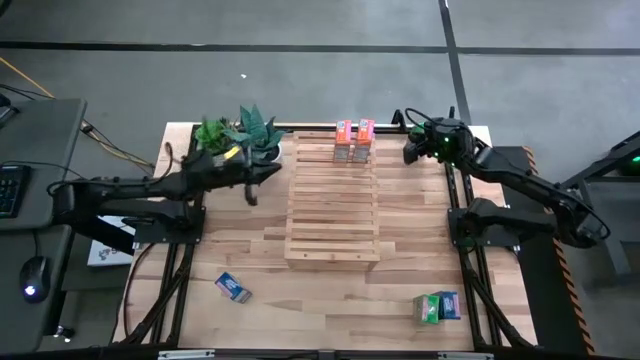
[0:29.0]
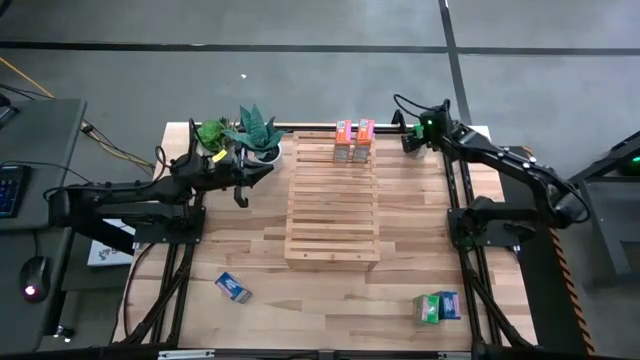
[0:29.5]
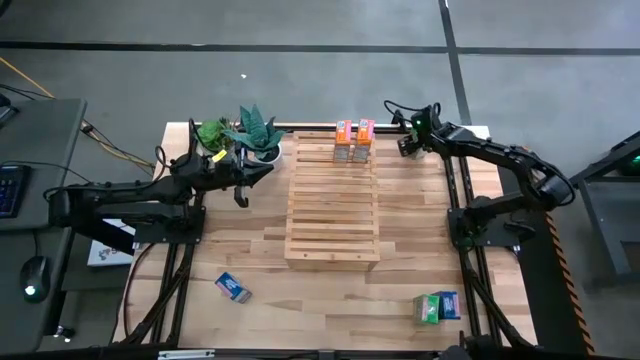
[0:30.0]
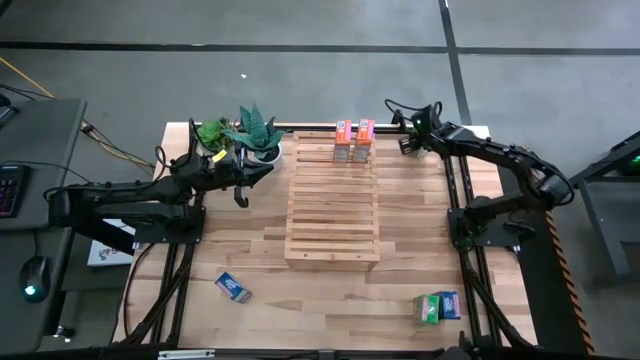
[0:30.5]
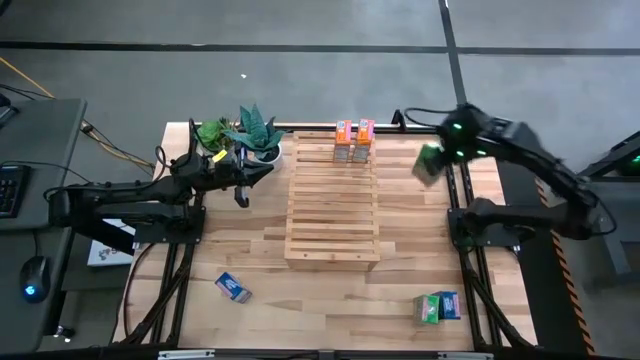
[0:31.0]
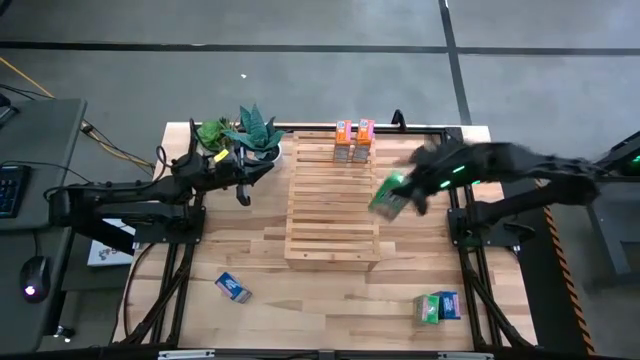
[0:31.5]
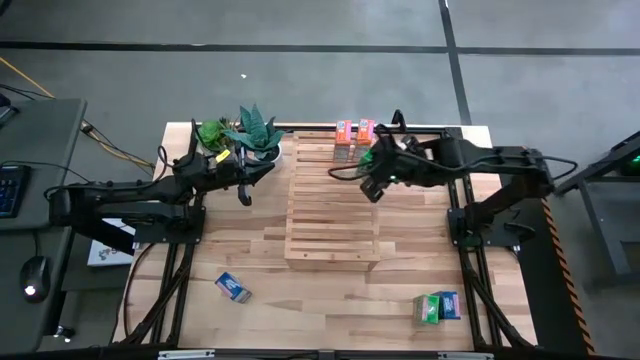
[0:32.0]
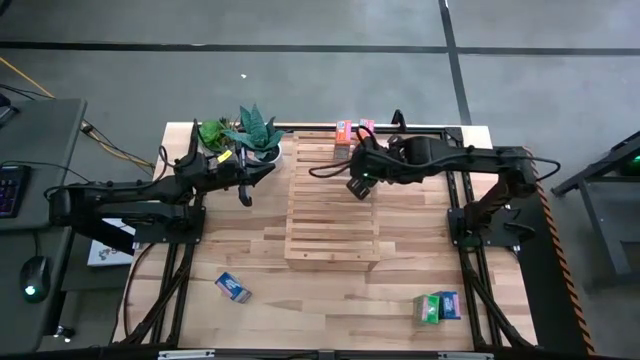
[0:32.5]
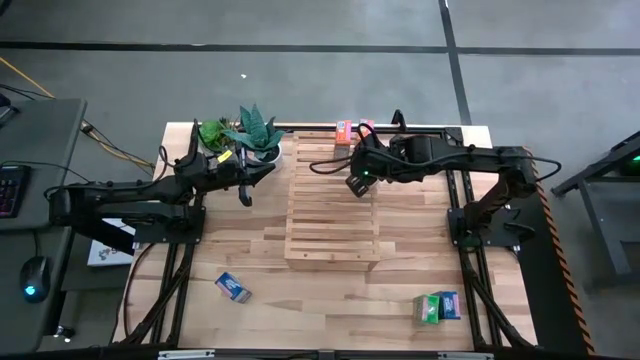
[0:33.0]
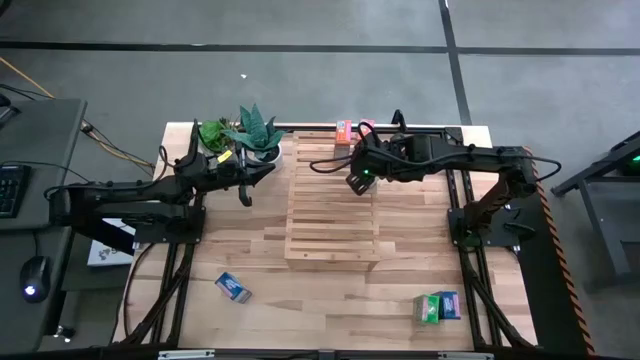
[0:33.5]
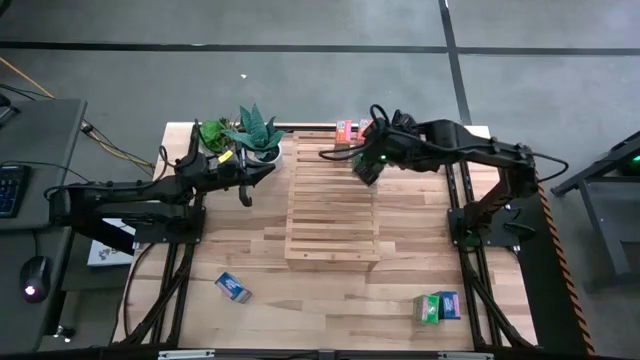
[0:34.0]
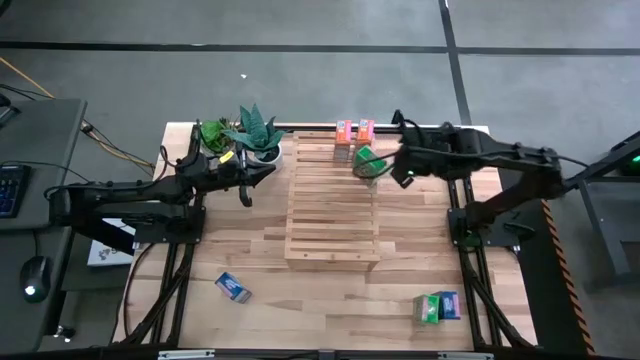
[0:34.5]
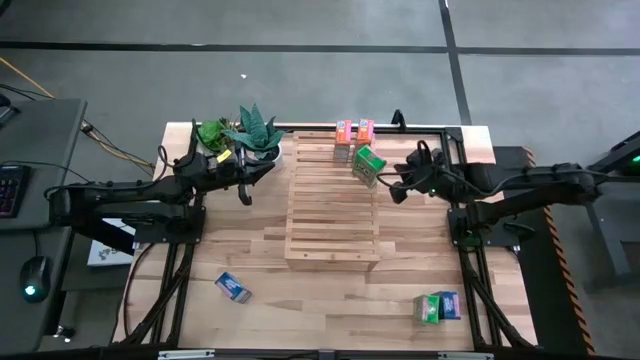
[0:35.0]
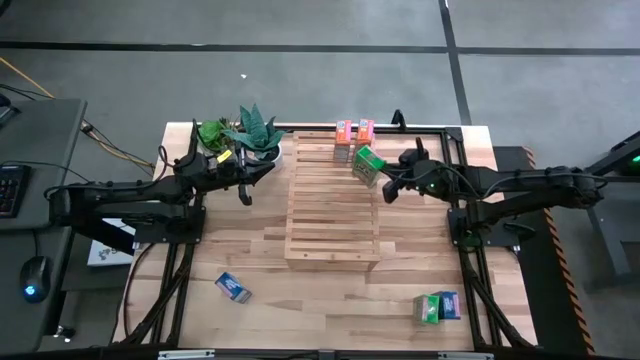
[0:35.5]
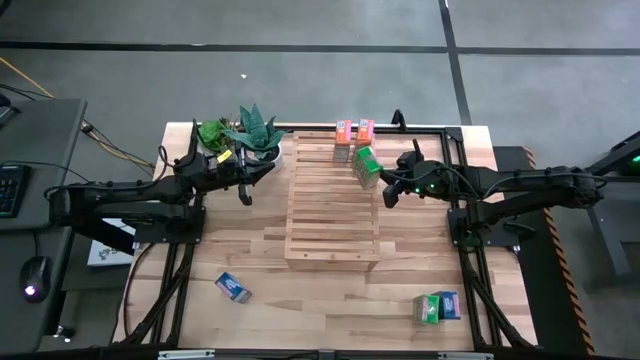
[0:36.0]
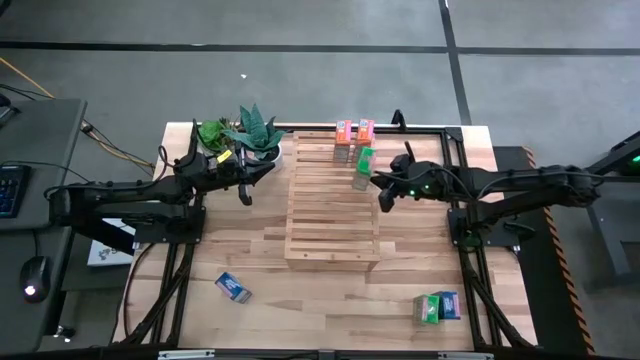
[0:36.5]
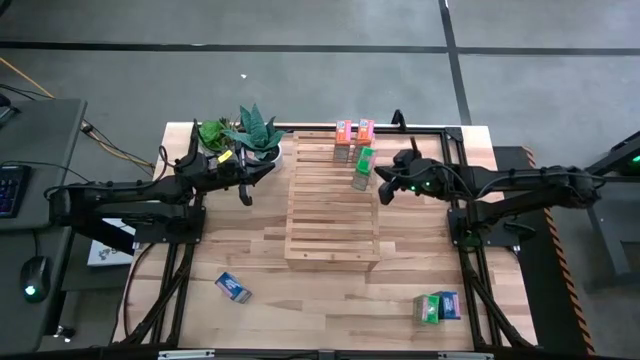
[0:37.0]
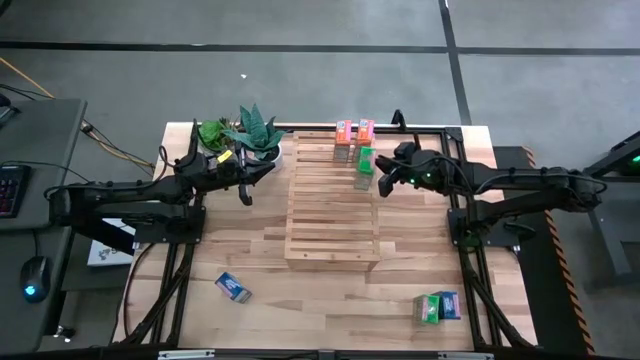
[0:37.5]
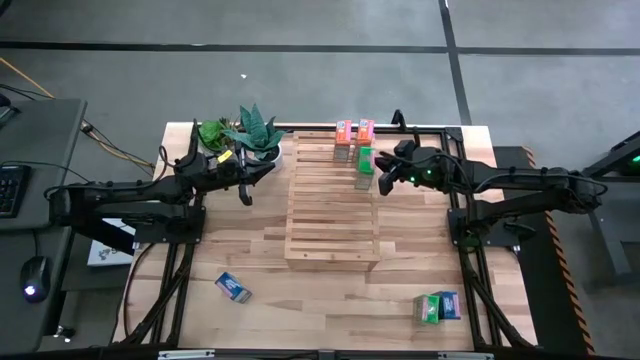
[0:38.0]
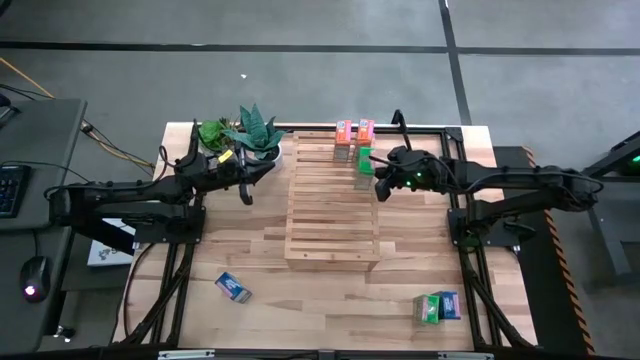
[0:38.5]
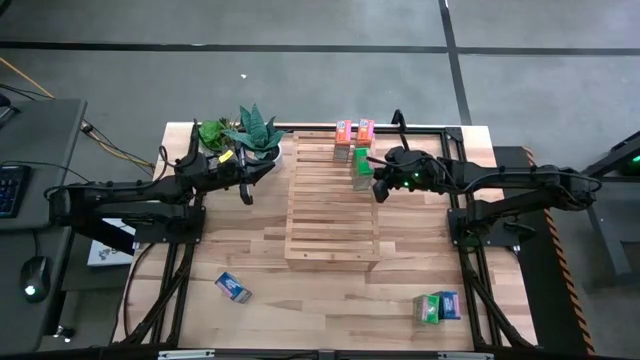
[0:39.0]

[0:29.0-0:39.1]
Task: Stack cereal on shelf
Put the top green cereal box on the shelf

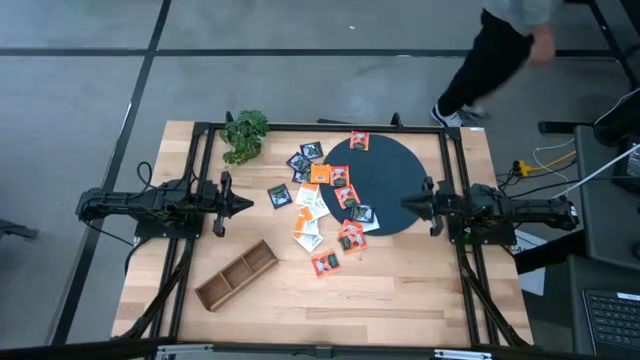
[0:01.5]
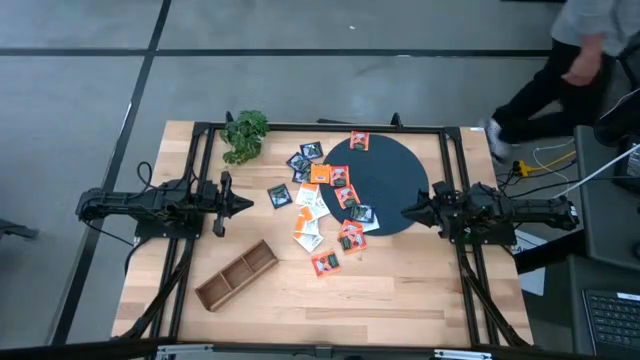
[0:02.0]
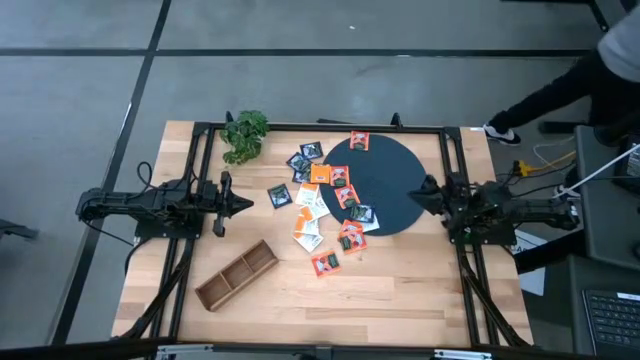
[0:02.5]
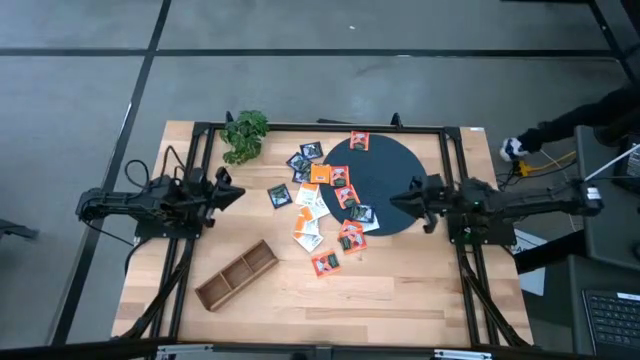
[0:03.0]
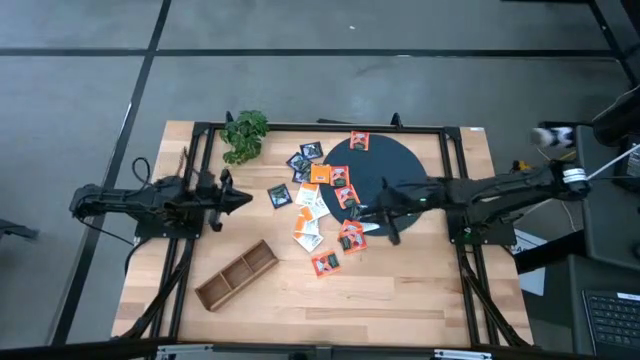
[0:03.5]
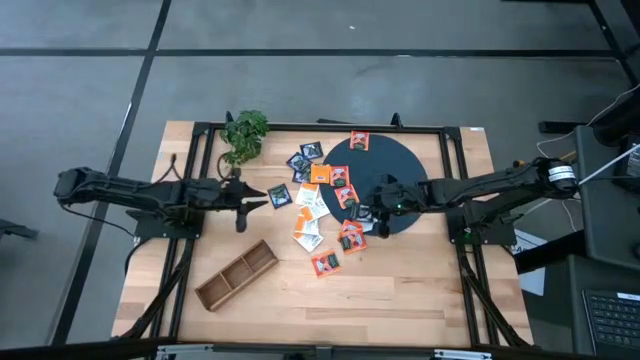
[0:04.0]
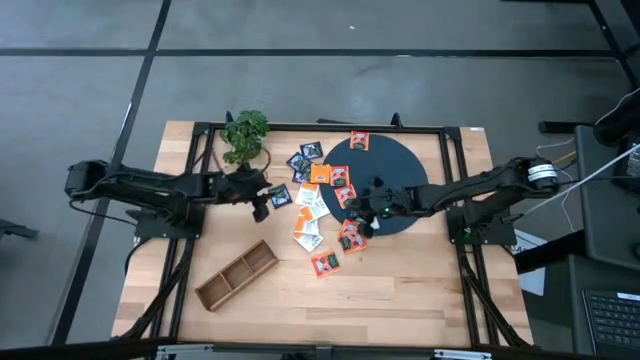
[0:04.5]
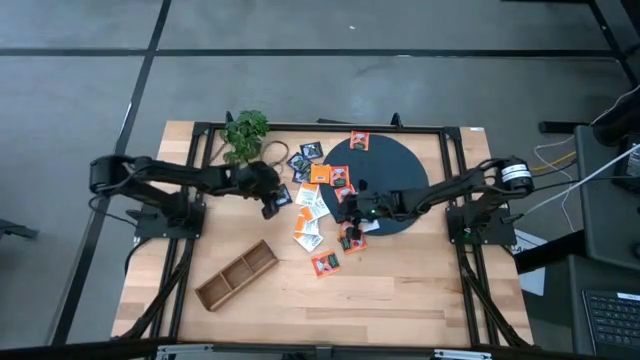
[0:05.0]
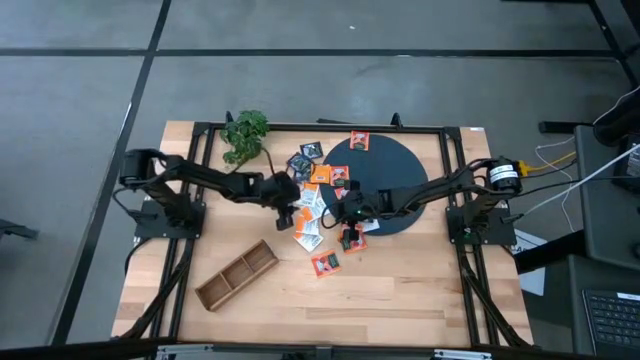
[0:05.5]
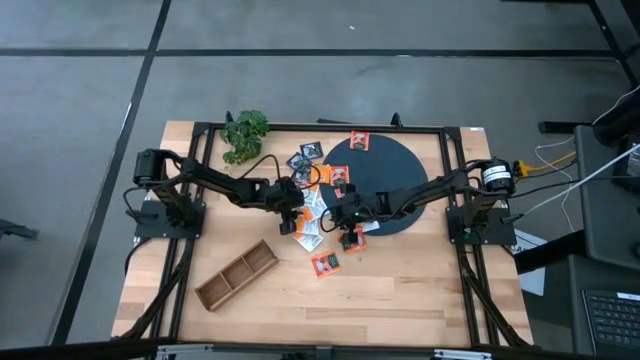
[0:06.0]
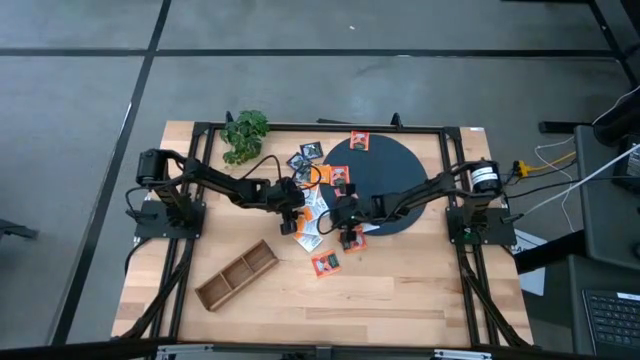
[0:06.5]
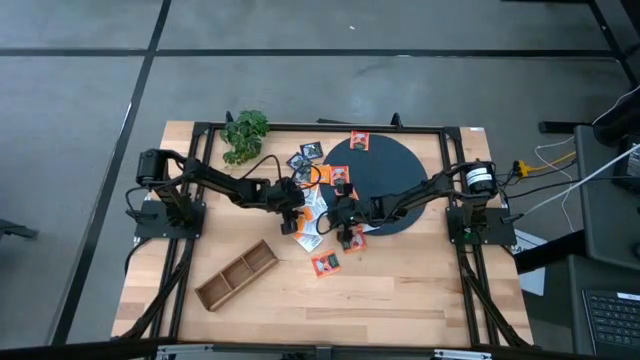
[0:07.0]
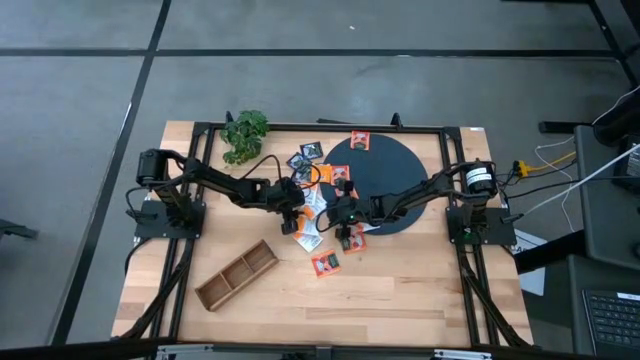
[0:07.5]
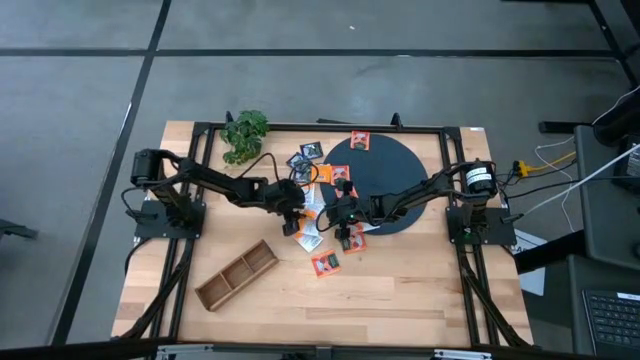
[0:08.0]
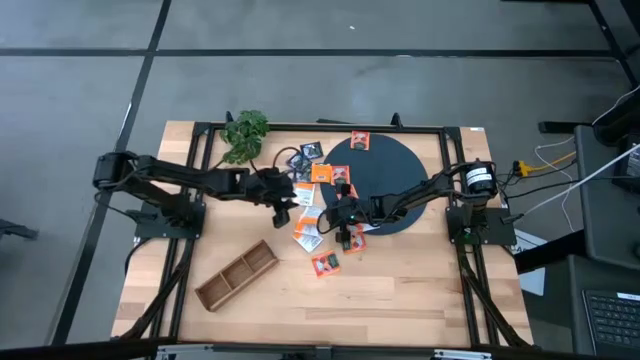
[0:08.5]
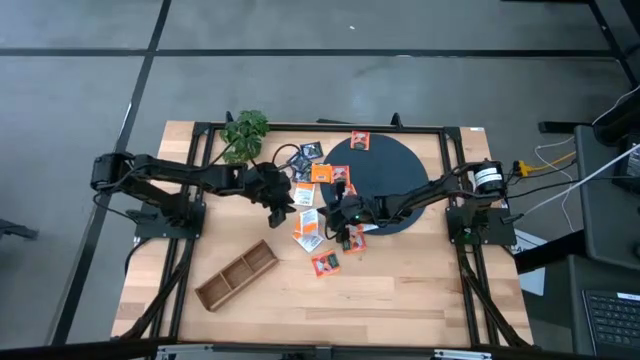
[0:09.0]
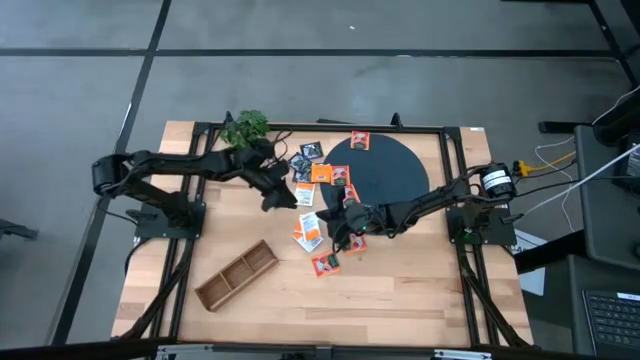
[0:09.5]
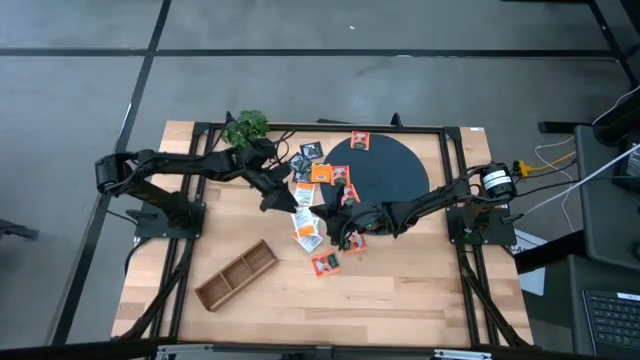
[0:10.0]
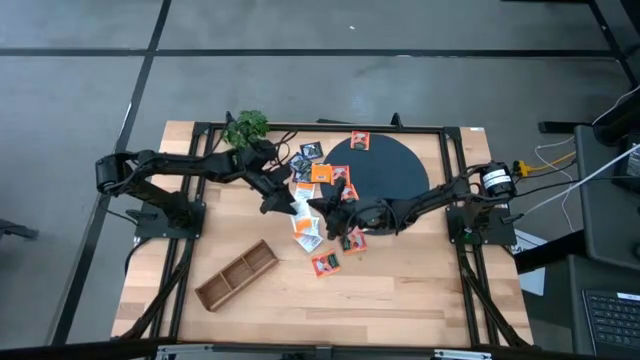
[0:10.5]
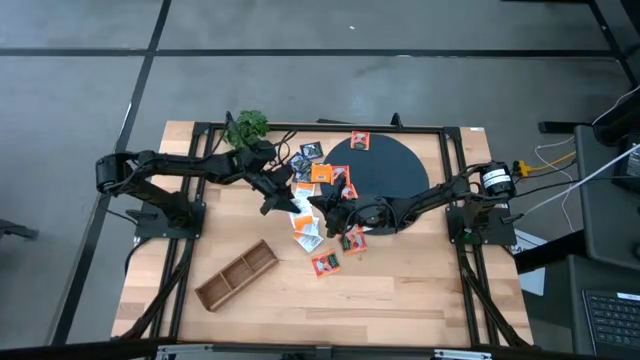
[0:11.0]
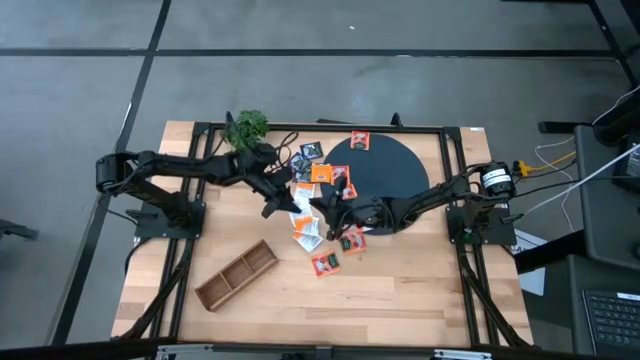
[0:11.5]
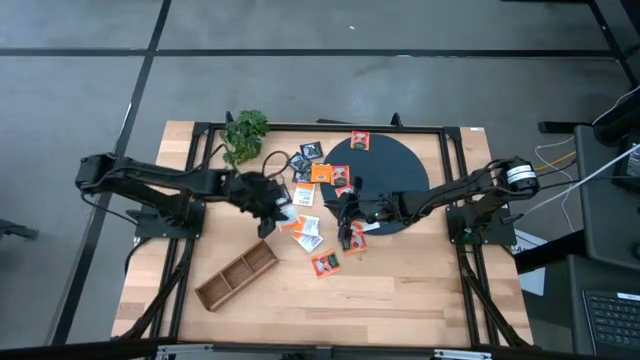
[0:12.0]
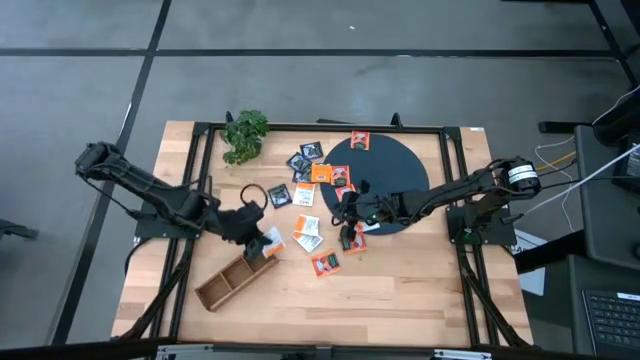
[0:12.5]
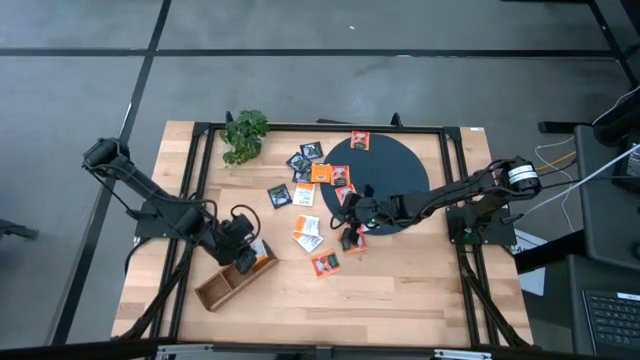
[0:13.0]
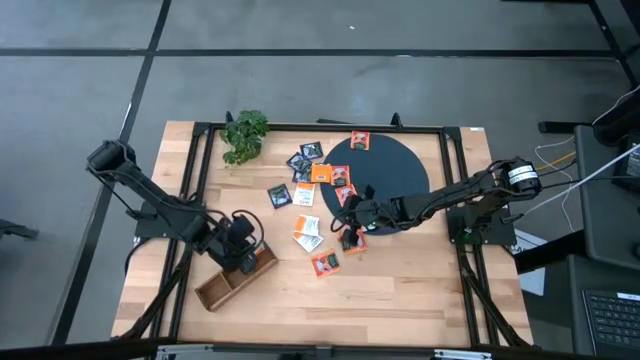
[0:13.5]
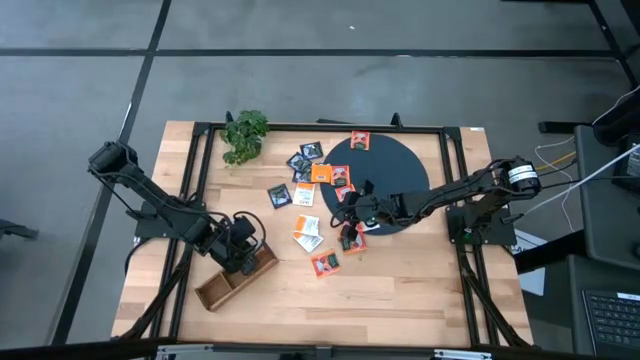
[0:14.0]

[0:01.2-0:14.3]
Task: Pick & Place Tea
Put the white tea bag into the right section of the wooden organizer
